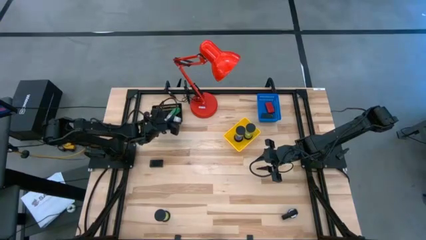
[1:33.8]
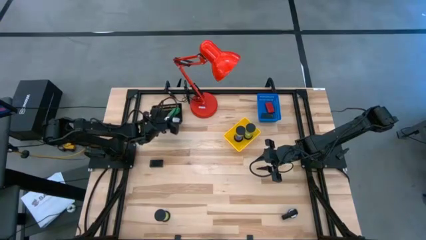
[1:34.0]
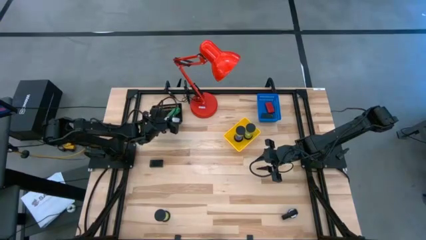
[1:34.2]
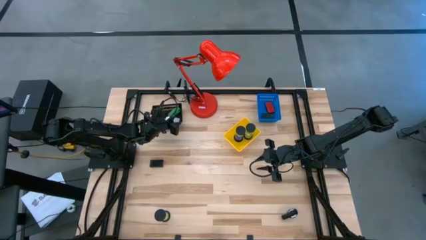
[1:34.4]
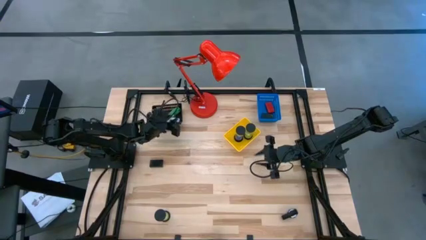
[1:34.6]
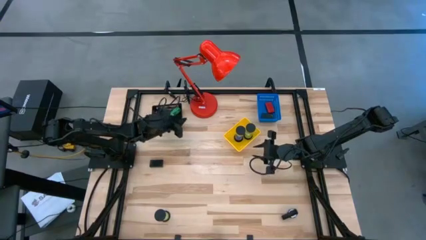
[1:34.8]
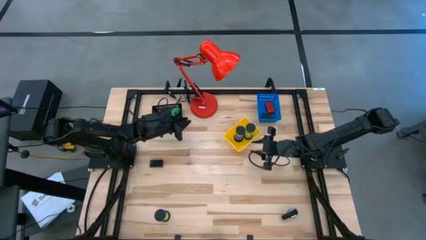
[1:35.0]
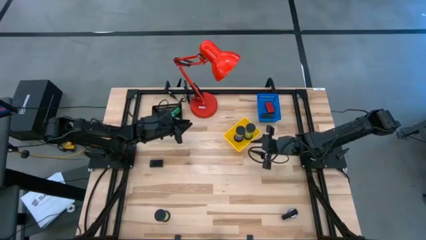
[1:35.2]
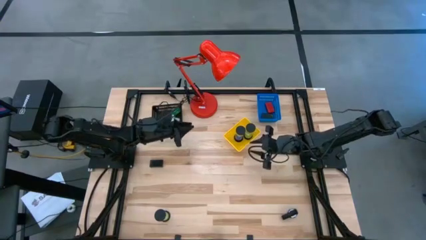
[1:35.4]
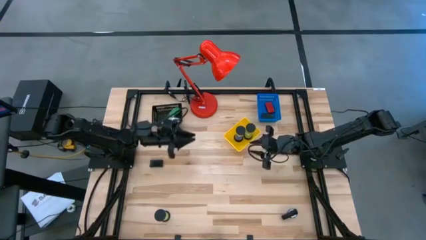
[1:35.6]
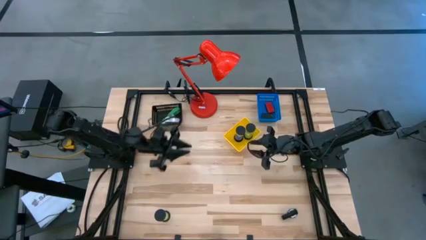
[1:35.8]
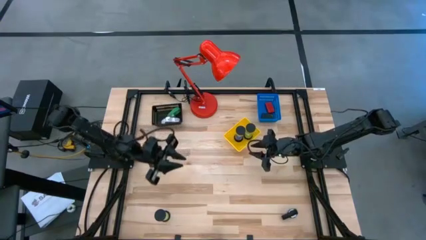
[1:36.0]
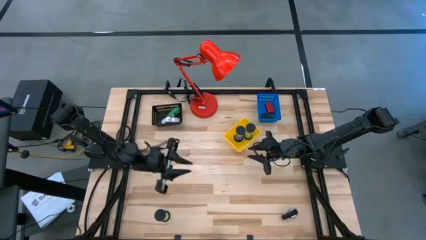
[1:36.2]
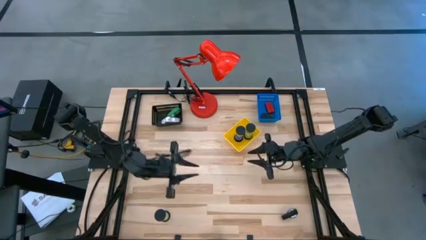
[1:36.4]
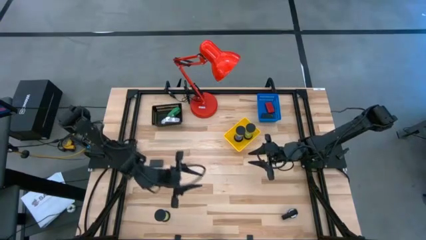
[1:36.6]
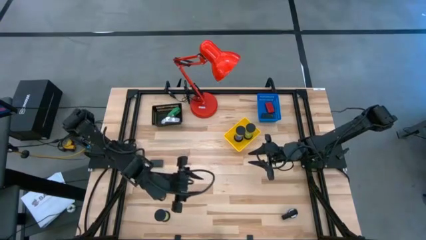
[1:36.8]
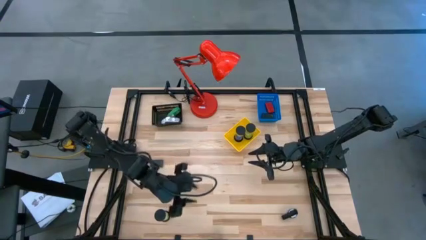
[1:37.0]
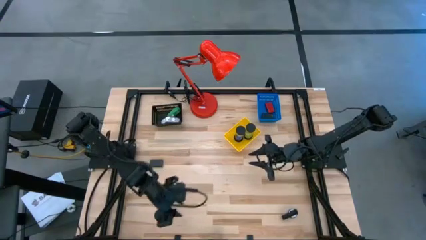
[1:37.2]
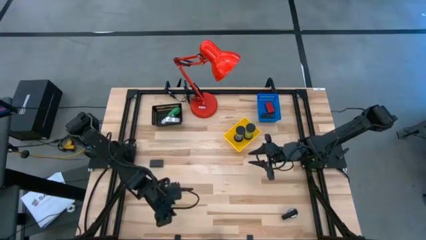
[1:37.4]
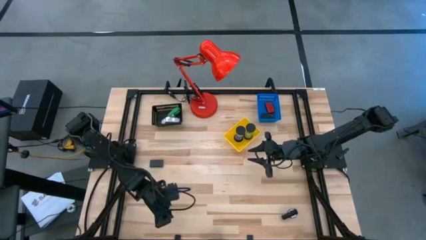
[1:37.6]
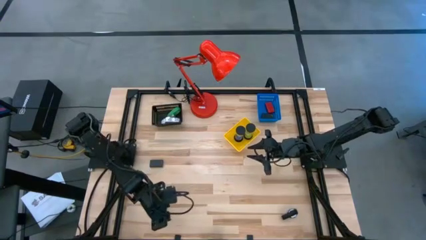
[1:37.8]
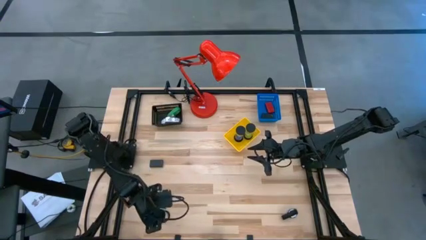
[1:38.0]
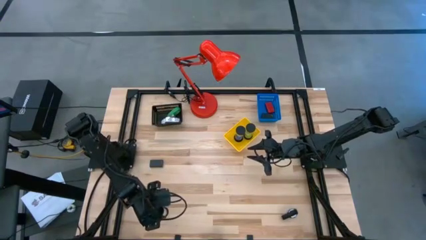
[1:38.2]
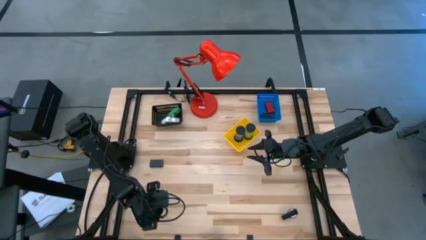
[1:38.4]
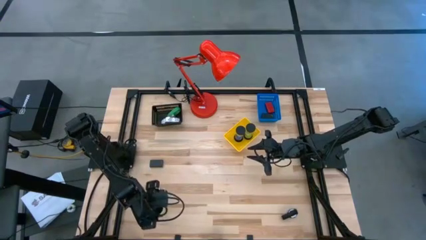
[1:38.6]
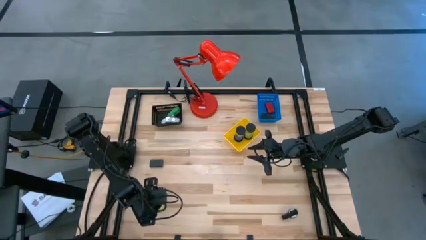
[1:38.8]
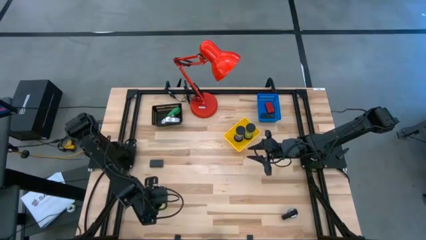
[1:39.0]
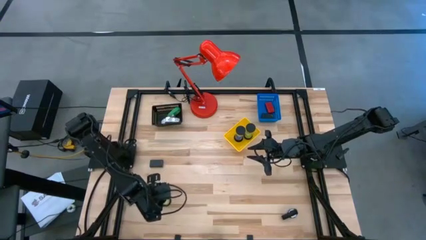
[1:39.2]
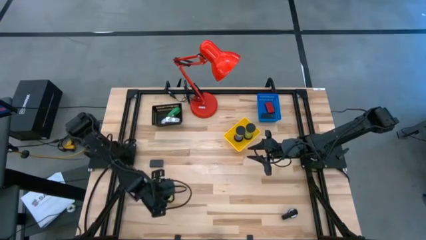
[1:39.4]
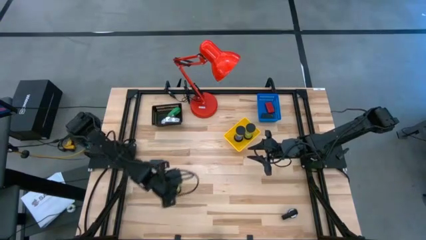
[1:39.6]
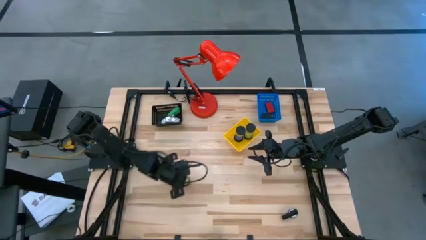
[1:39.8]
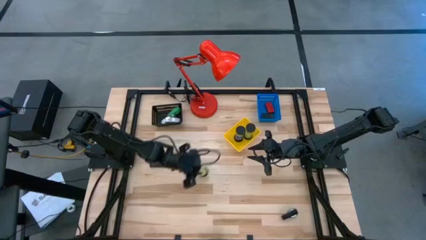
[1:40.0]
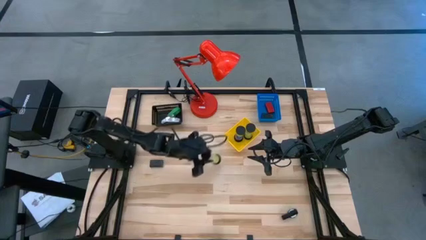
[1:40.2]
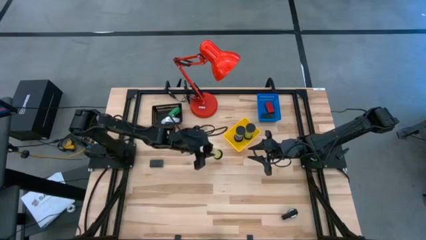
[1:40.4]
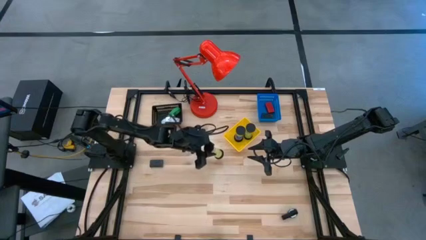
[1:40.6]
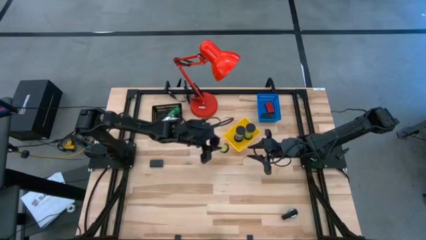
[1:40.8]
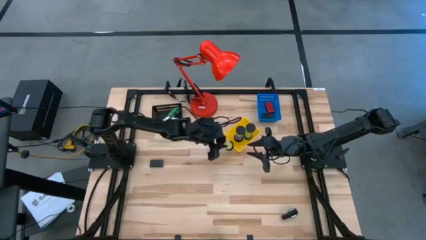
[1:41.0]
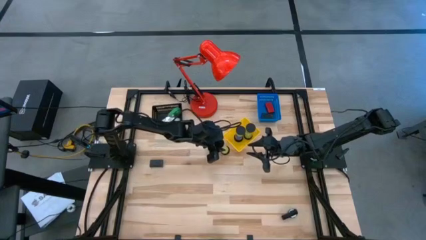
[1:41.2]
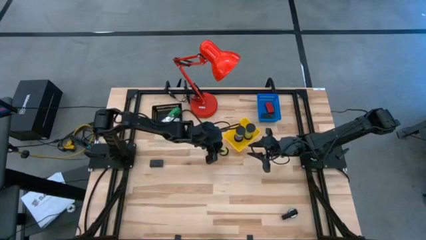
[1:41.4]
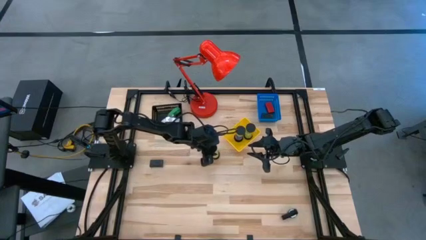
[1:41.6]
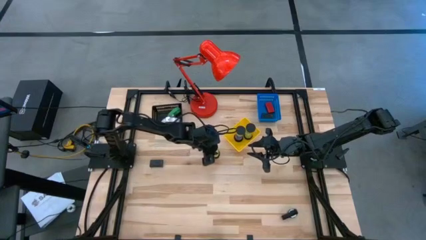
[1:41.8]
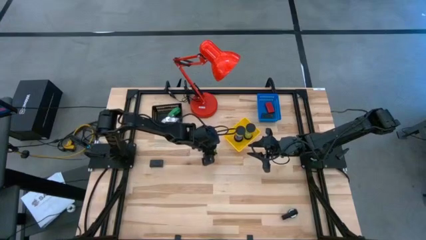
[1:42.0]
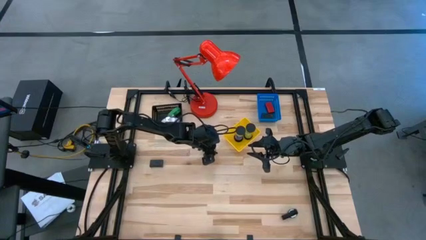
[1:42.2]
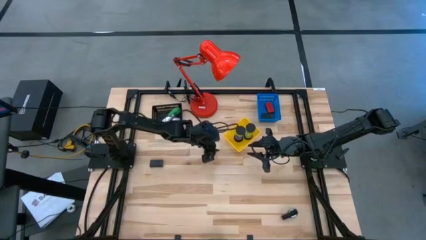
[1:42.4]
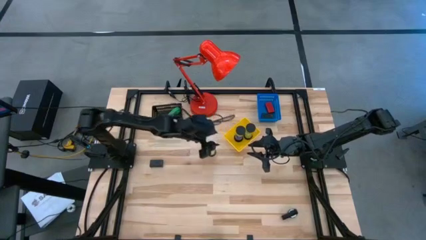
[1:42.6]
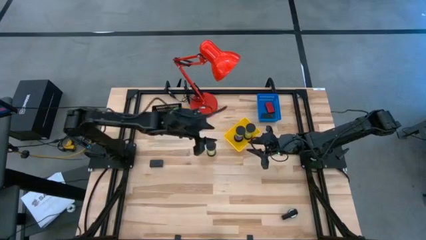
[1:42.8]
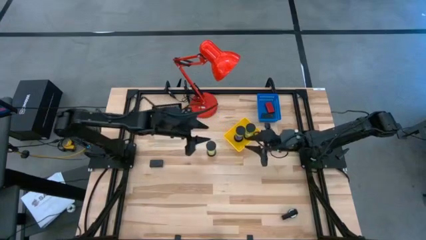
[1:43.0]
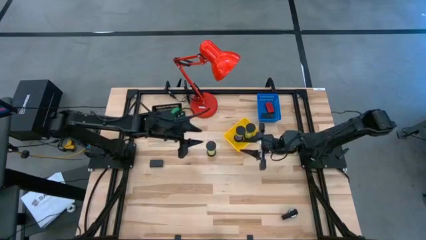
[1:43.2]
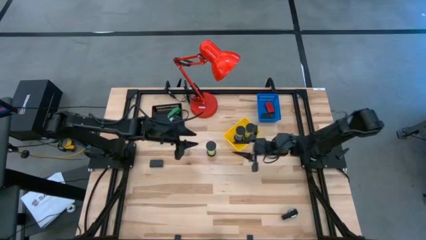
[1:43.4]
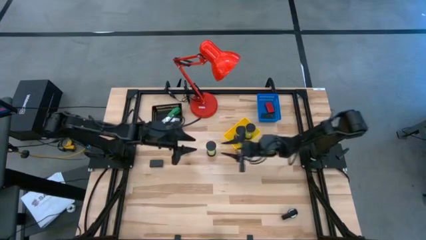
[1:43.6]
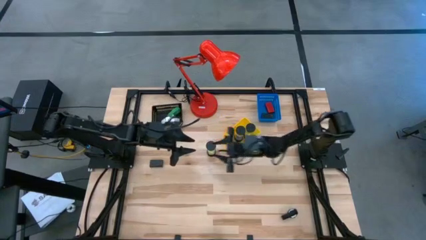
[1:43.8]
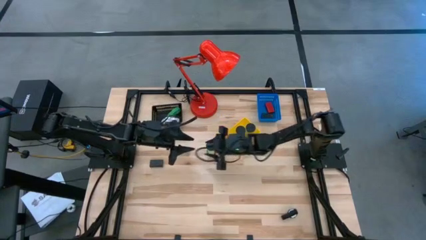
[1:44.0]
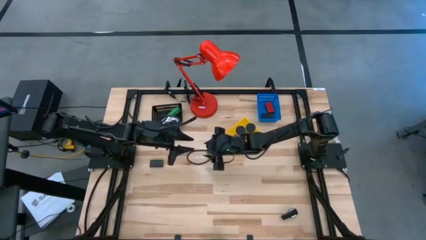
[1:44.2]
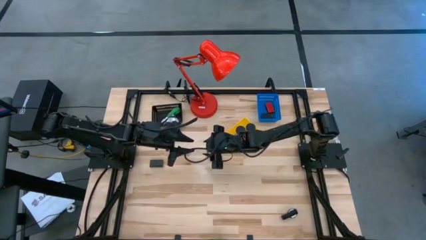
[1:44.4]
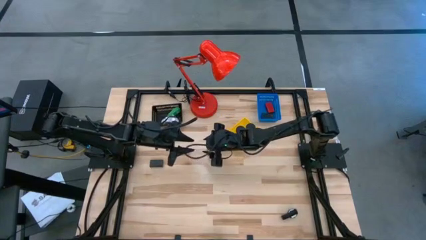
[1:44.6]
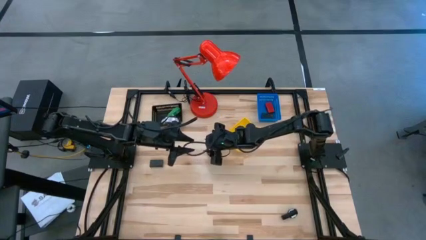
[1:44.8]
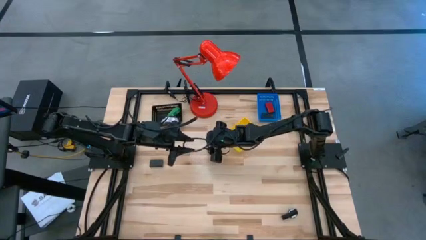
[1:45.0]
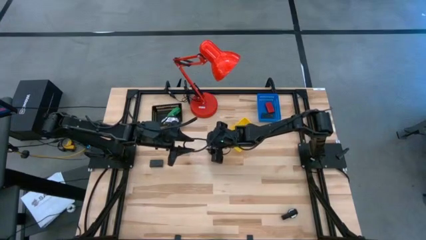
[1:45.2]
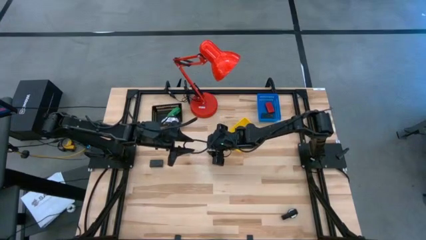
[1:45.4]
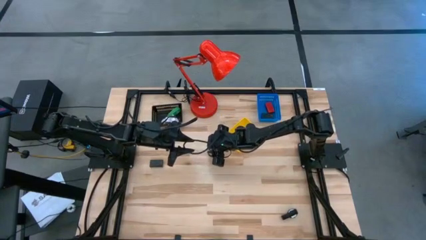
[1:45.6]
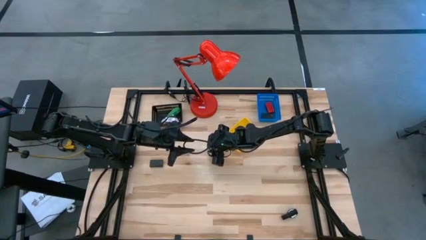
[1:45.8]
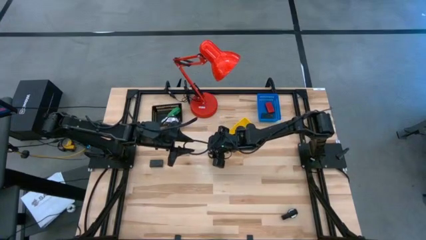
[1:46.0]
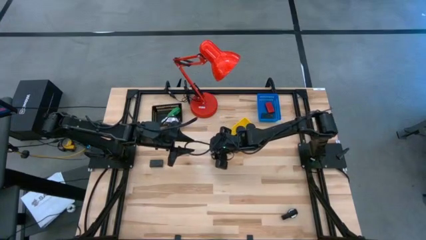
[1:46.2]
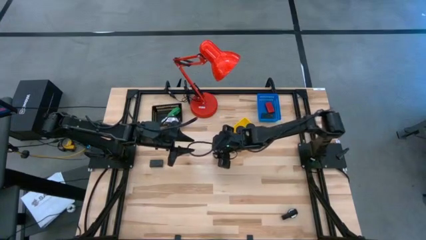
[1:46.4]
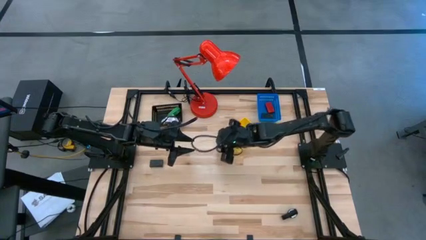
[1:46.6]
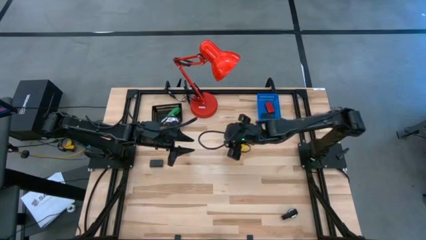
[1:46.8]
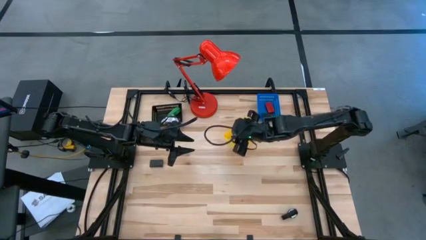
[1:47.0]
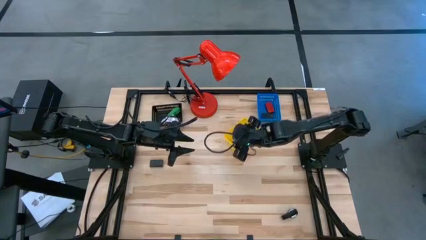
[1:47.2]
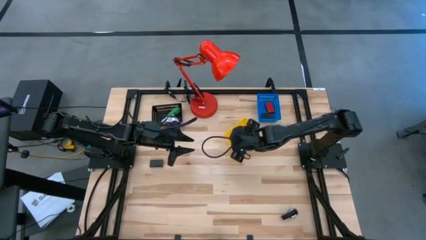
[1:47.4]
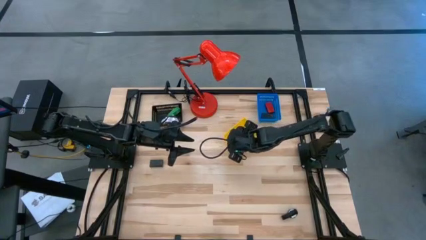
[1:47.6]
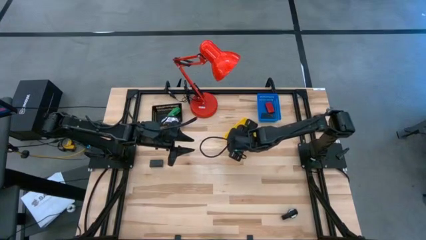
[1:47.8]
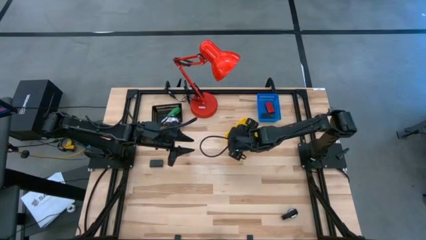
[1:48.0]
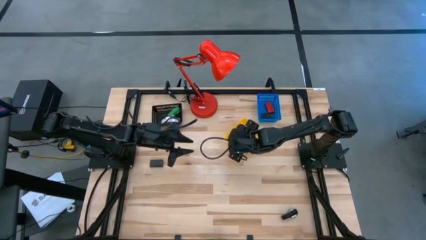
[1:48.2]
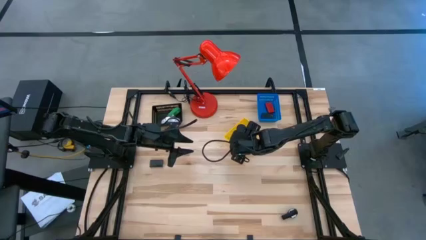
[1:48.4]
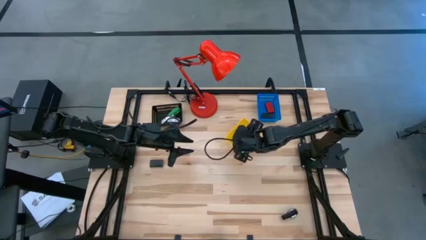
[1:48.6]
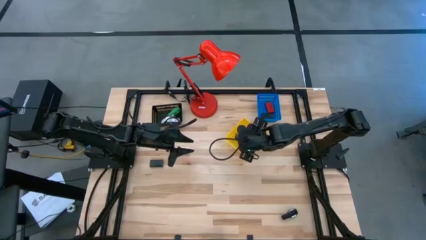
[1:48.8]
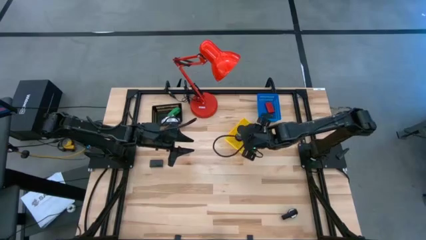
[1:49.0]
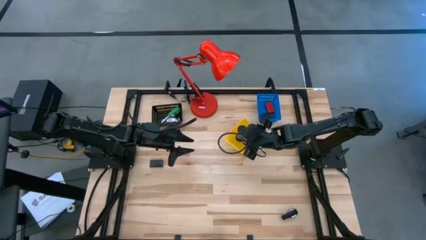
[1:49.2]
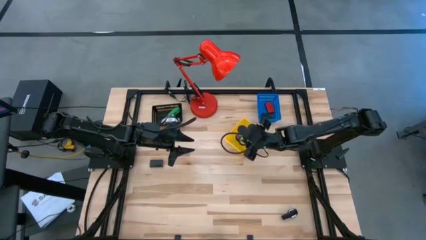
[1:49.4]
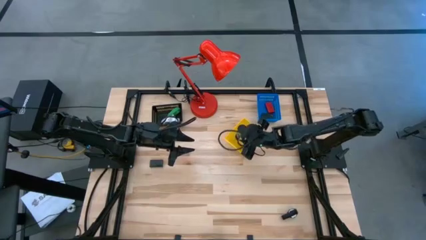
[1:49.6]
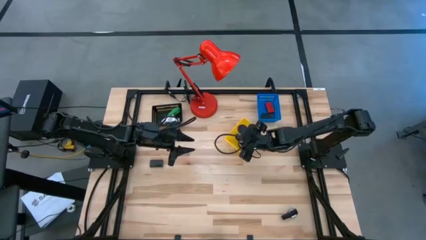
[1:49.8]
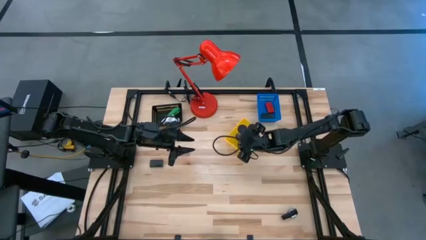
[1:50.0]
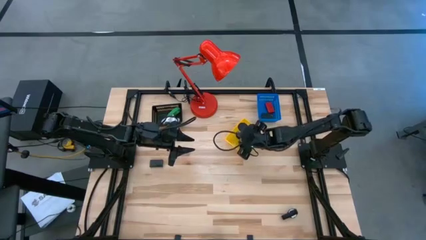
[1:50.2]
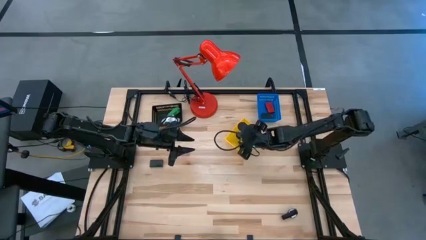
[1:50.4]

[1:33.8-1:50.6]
Task: Pick & Place Office items
Put the light green hourglass into the yellow bin
